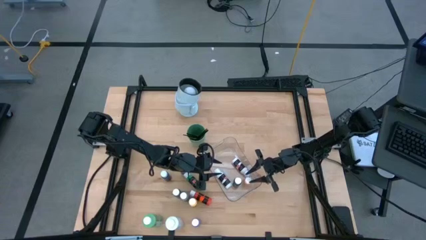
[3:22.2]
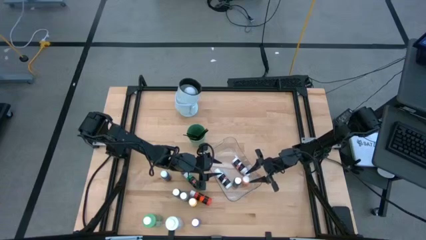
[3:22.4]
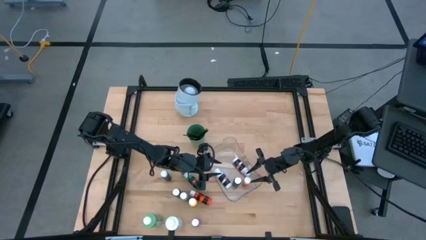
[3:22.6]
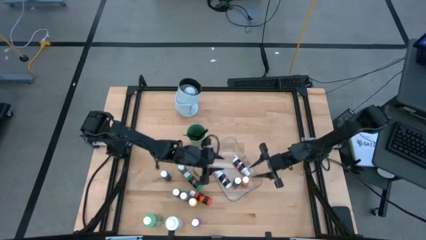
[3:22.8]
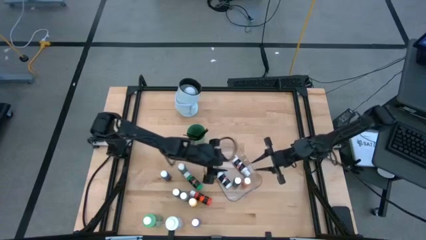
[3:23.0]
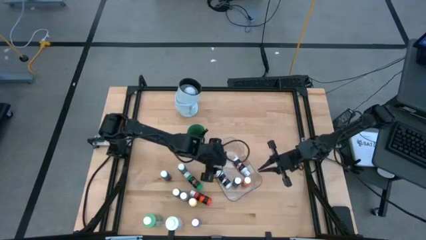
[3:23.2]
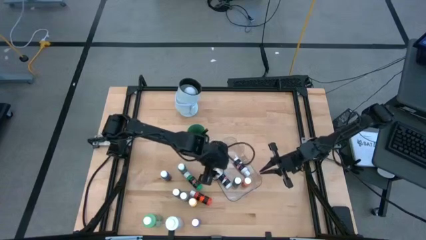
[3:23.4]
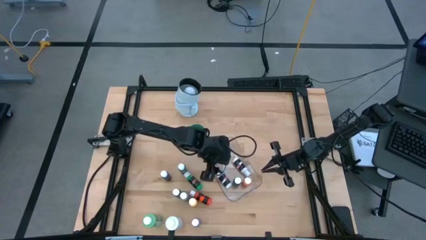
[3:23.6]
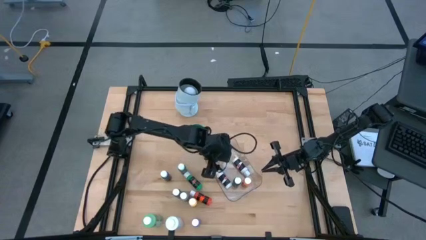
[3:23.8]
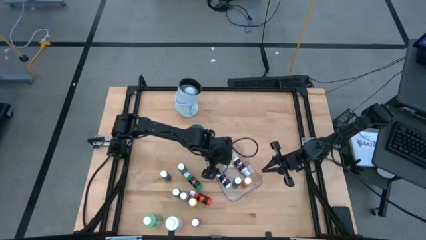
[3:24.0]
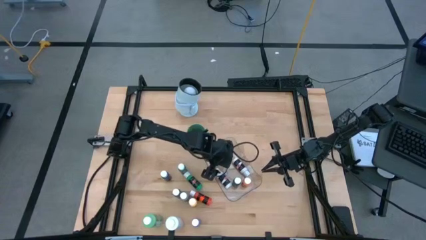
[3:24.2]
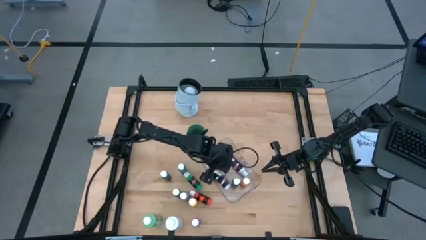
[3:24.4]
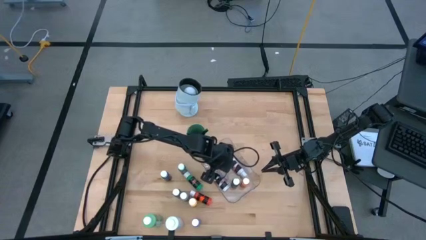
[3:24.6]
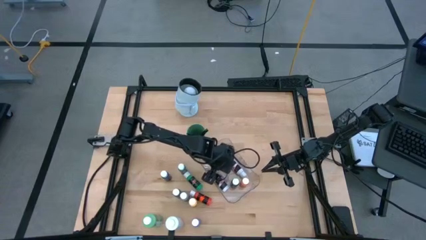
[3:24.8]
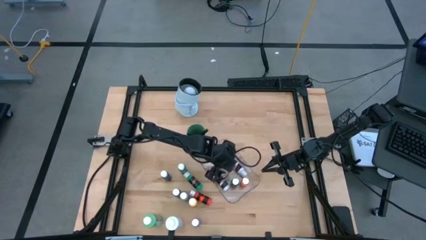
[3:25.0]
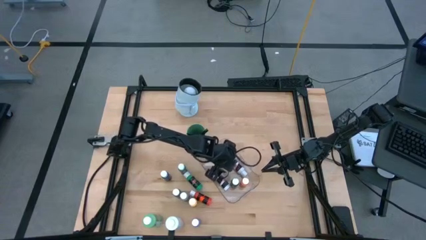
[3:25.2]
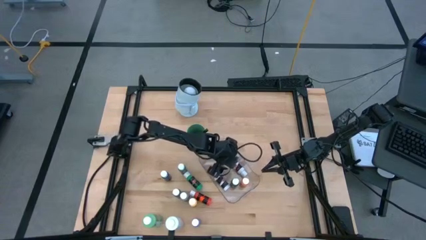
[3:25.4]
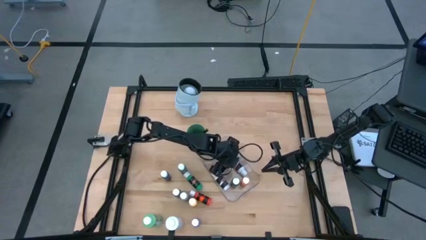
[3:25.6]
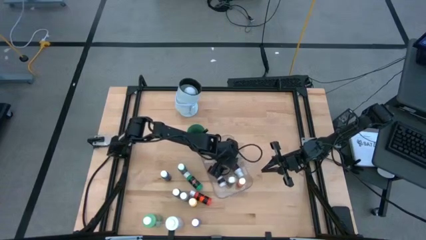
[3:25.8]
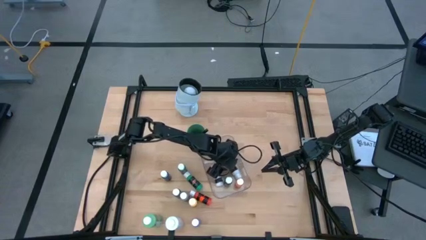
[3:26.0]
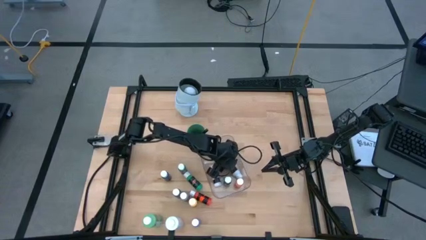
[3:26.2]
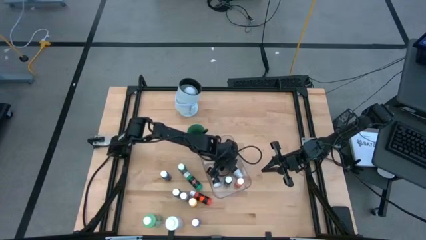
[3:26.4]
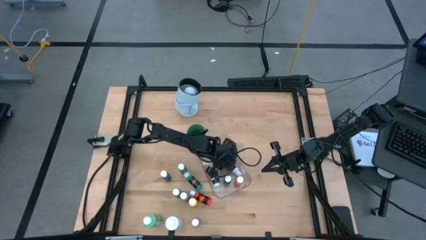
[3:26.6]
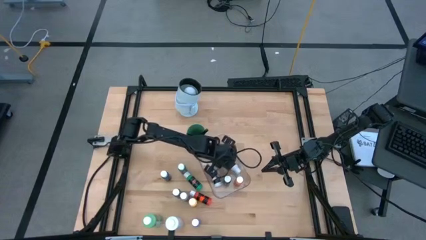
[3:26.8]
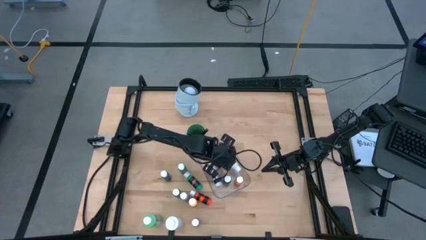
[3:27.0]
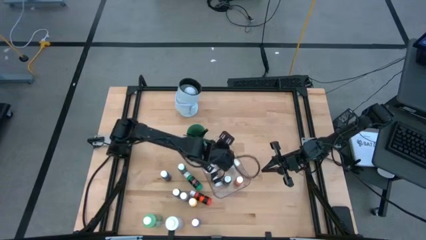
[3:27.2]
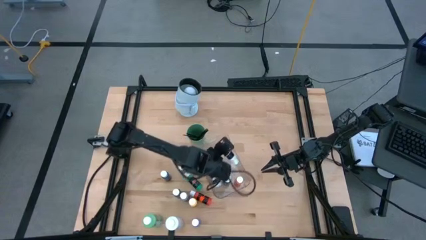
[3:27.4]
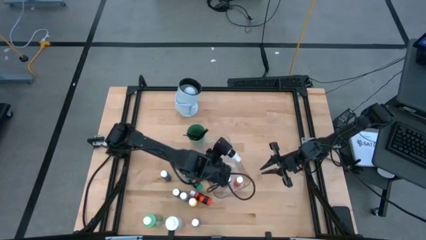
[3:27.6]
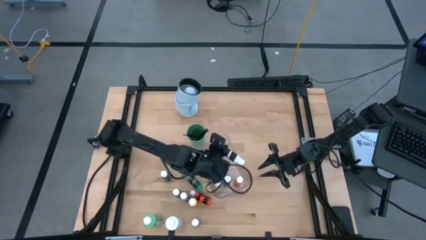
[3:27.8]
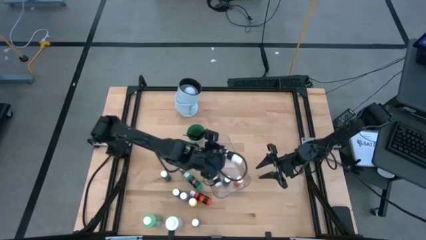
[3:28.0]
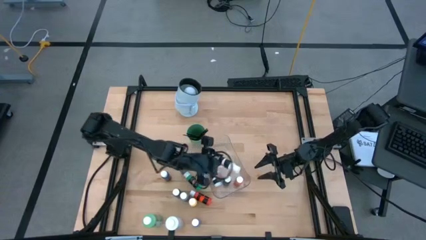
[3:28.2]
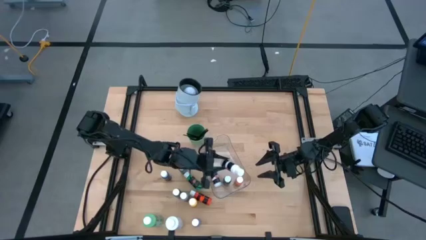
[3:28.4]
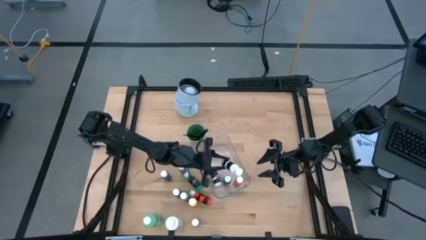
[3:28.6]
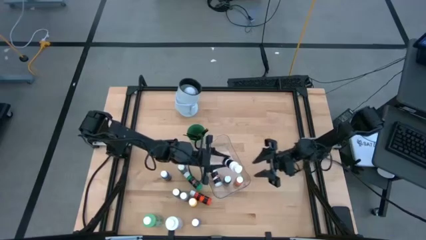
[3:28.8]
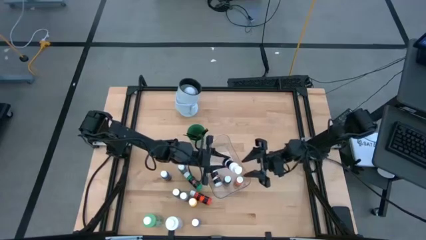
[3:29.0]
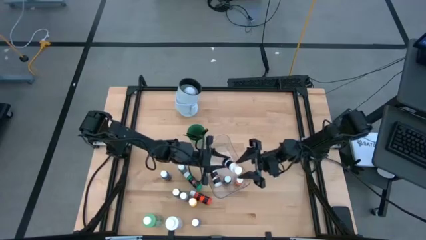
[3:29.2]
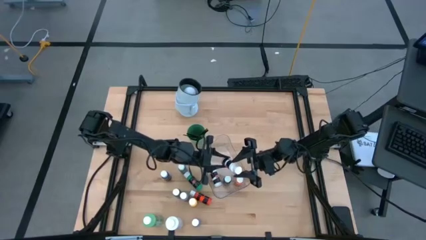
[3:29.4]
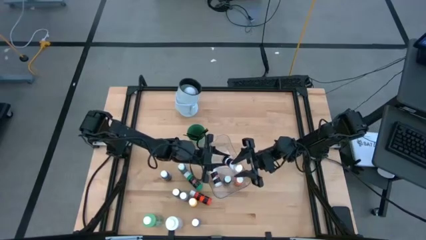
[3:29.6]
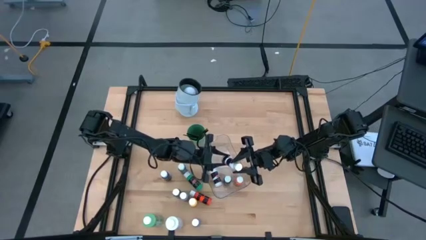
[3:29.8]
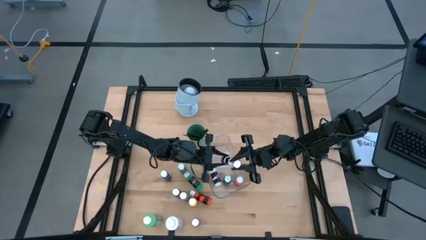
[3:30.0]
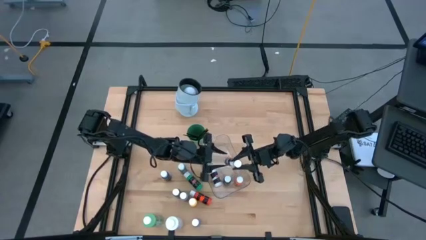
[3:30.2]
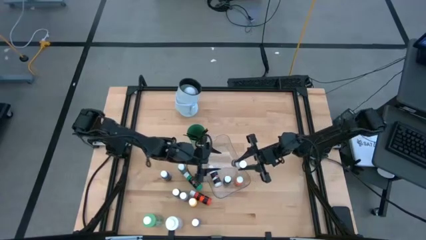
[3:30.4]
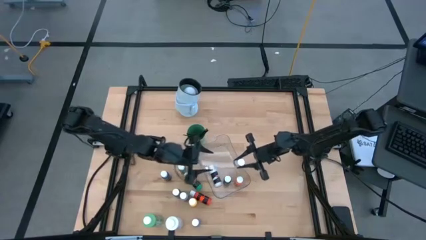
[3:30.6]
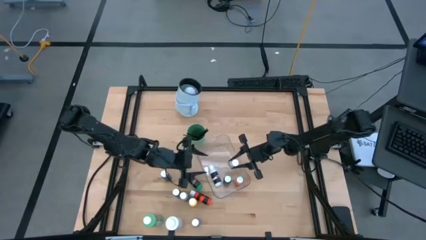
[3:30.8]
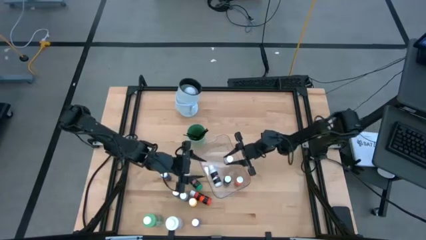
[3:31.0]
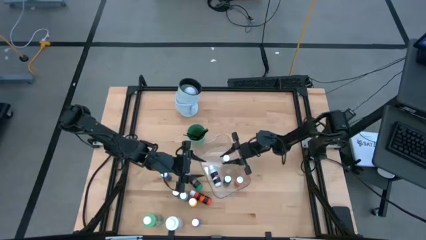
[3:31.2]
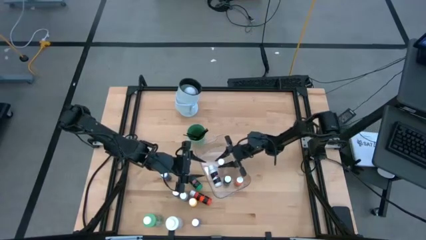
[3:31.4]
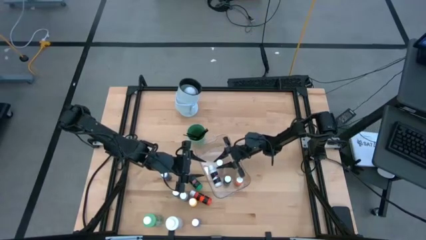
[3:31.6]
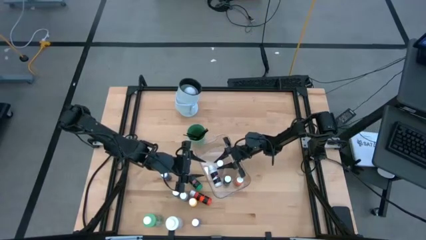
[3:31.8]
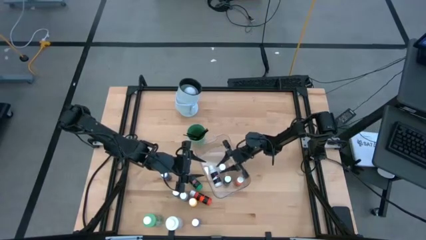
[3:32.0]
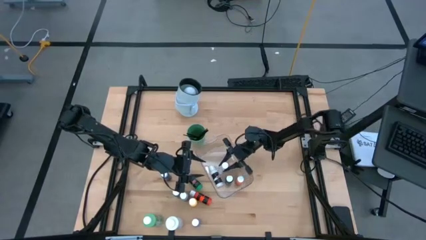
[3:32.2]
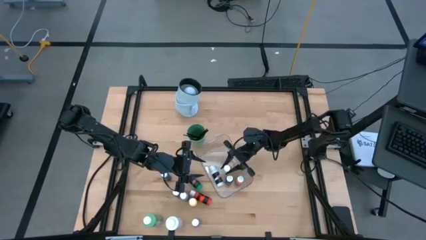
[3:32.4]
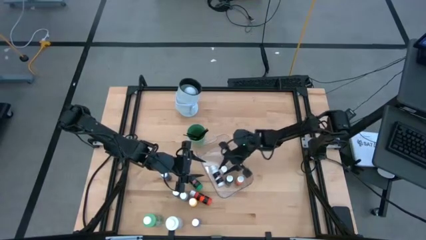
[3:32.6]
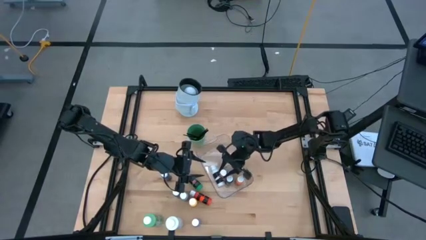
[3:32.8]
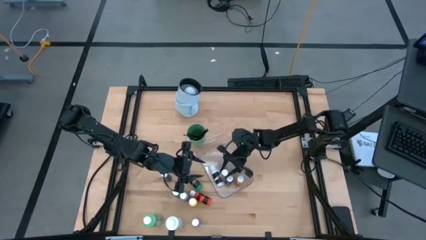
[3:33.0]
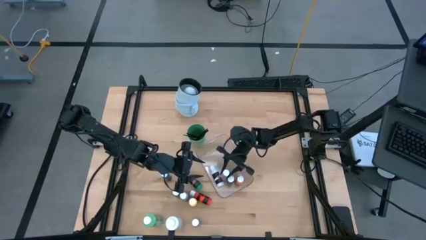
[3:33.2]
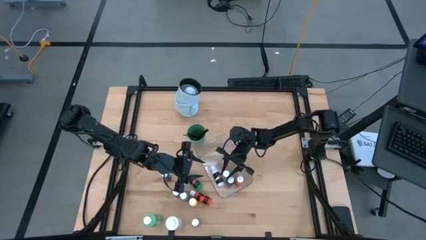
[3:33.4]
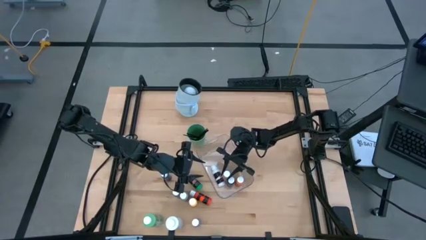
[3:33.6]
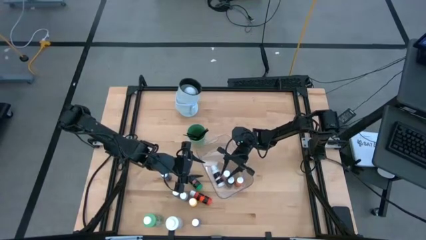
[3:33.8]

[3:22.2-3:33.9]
Task: Pick & Place Paint Supplies
Adjust the small white paint bottle in the transparent bin

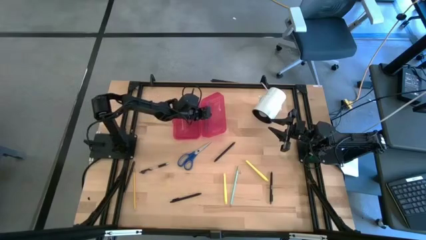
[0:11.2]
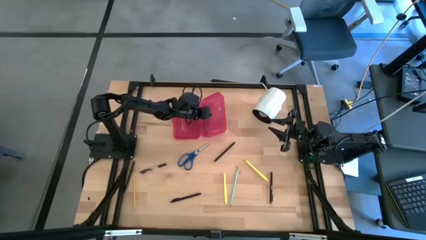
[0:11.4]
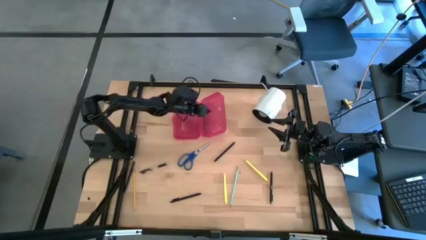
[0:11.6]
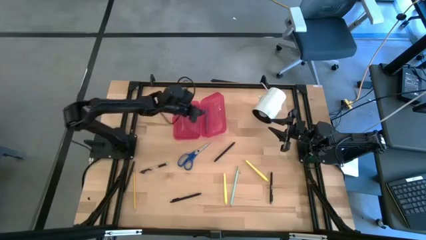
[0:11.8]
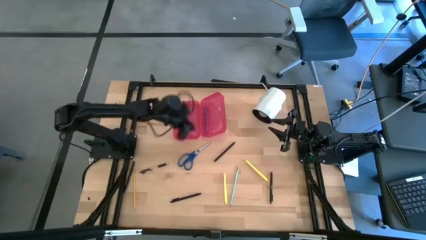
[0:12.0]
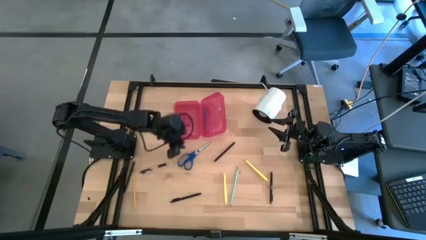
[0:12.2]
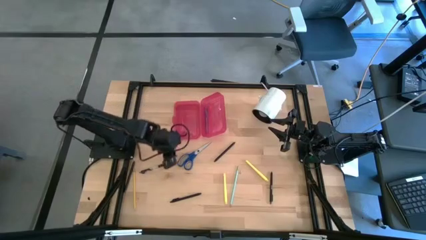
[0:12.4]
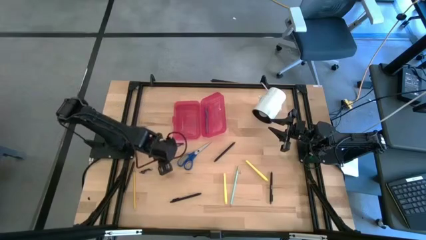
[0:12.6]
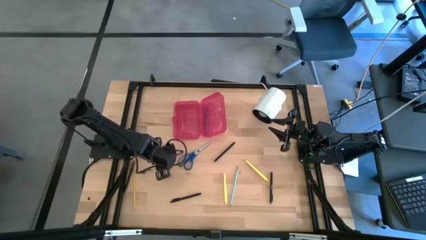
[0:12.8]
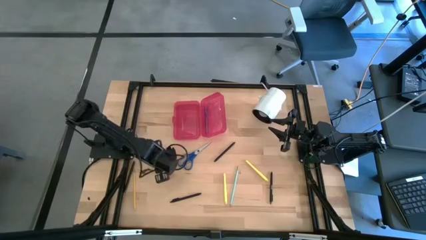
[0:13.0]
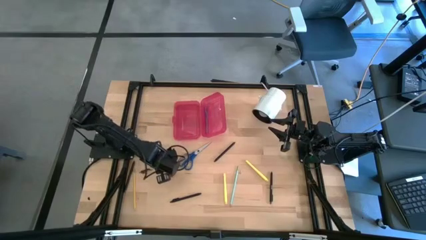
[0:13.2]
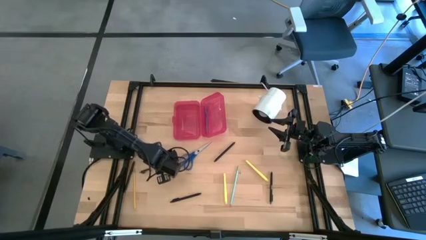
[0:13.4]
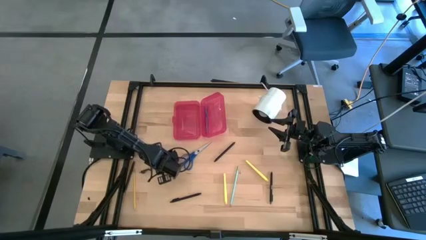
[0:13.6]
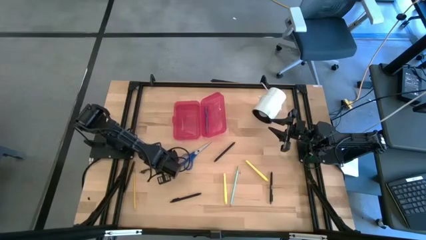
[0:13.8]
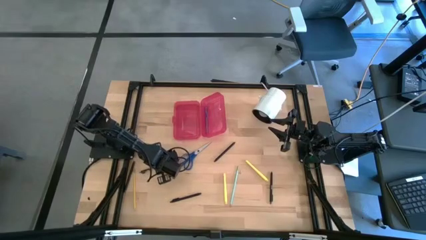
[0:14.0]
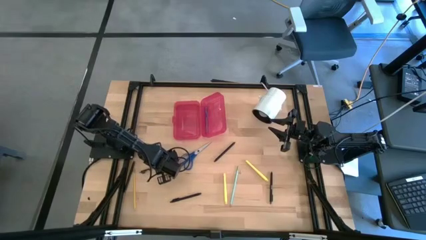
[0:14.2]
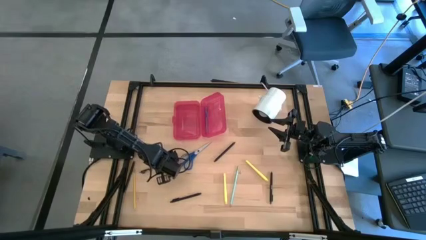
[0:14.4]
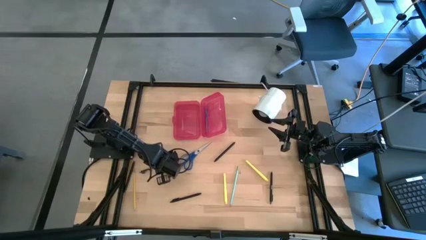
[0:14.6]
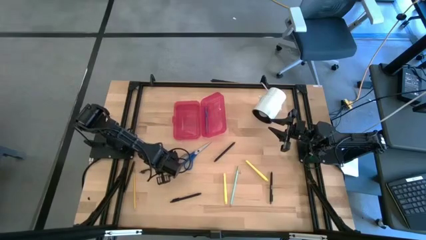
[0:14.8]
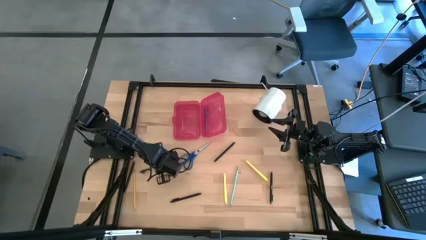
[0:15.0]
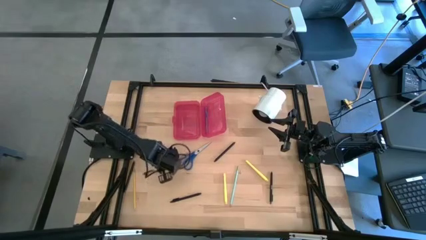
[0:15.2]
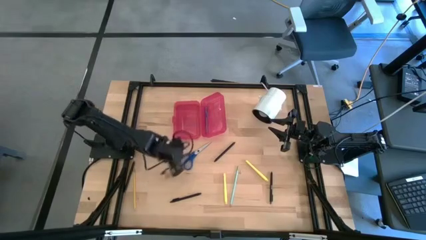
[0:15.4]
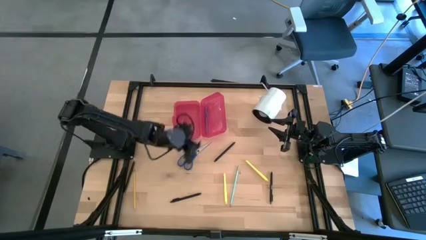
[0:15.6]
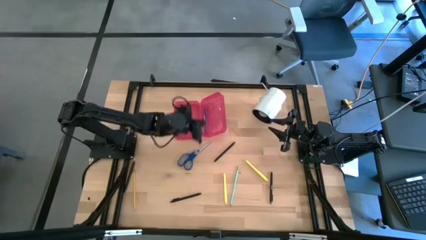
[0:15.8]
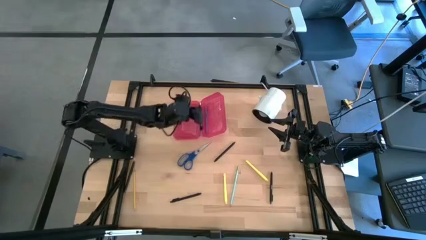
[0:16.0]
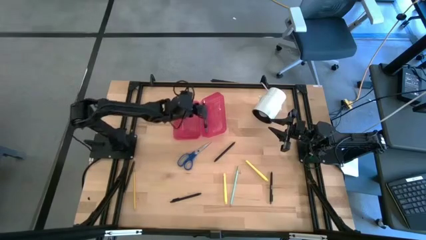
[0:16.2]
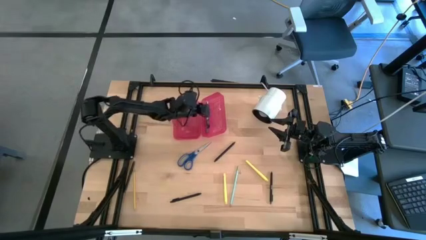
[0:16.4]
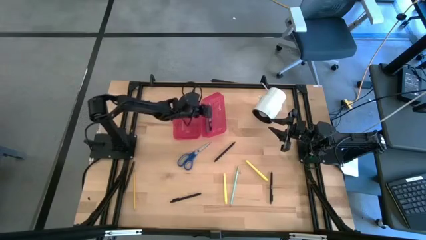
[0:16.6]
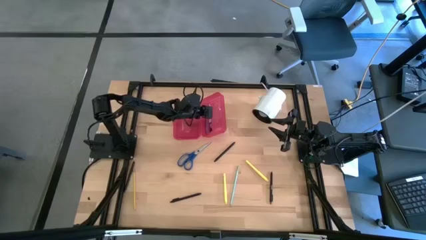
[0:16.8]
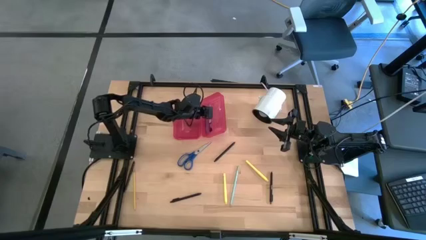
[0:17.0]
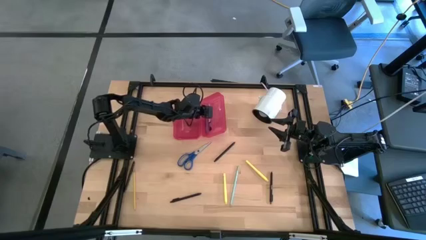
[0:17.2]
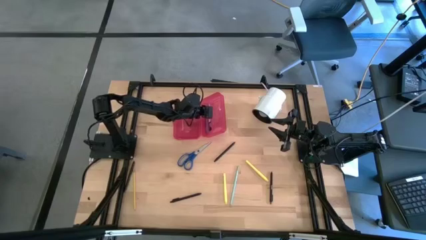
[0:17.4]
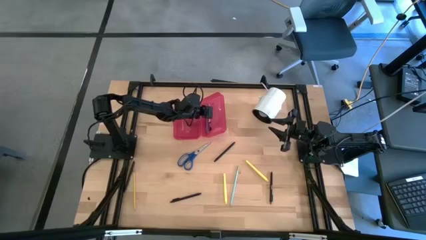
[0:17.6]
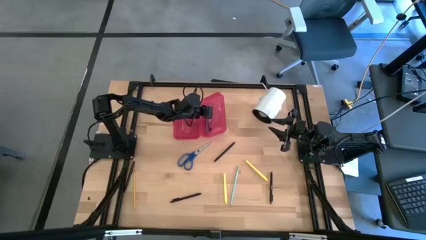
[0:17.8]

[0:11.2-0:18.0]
Task: Pick & place school supplies into a supply box
Put the black pen into the red supply box
